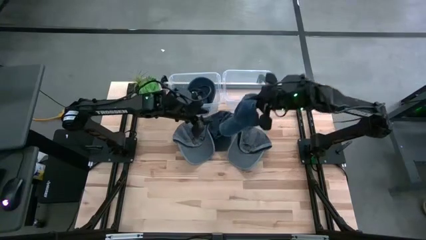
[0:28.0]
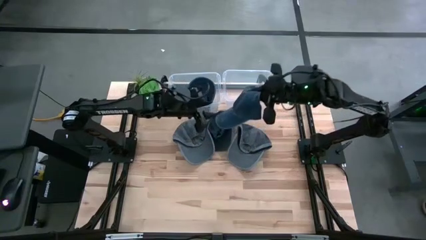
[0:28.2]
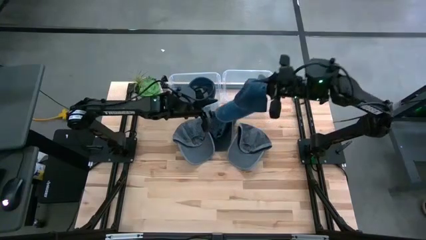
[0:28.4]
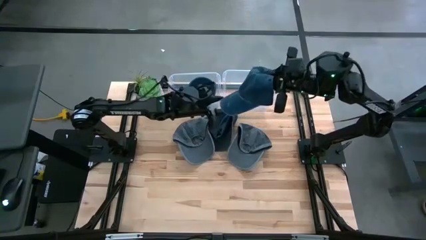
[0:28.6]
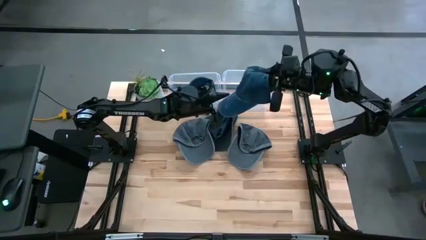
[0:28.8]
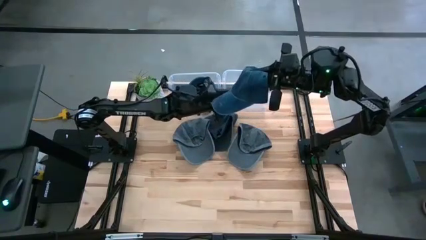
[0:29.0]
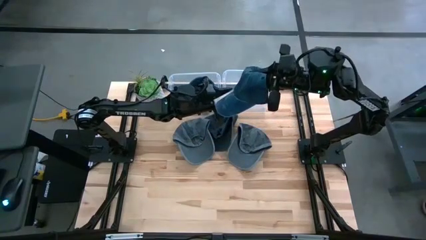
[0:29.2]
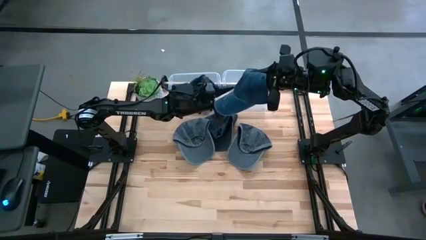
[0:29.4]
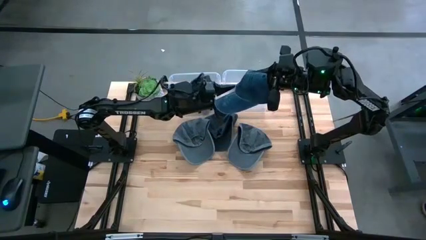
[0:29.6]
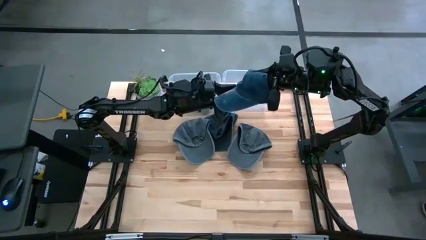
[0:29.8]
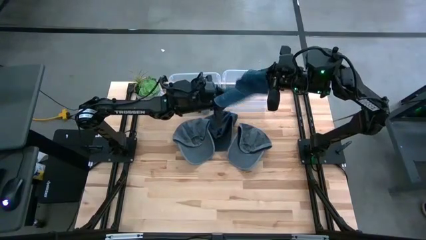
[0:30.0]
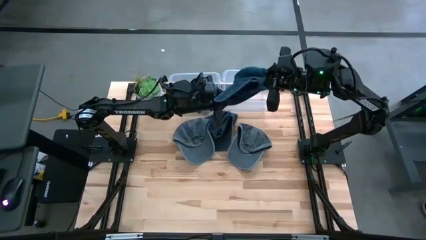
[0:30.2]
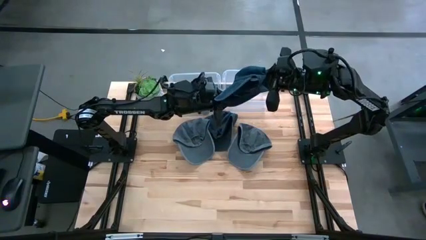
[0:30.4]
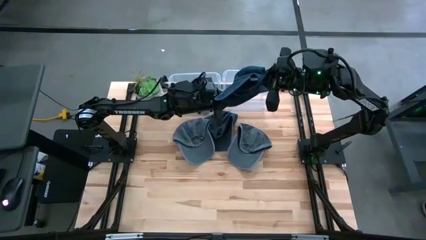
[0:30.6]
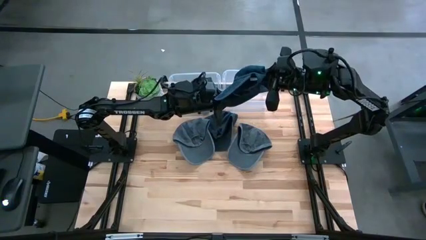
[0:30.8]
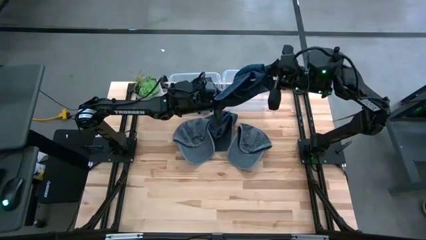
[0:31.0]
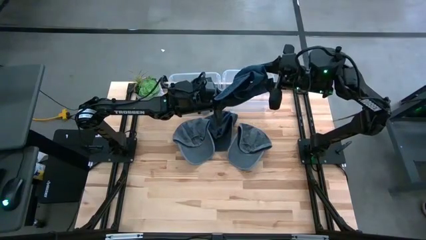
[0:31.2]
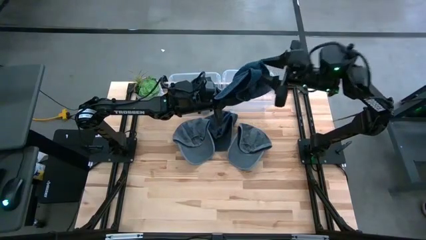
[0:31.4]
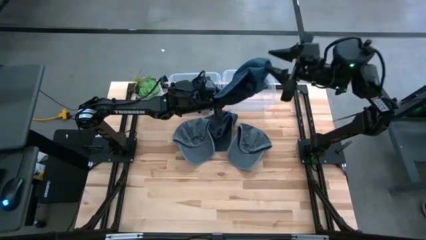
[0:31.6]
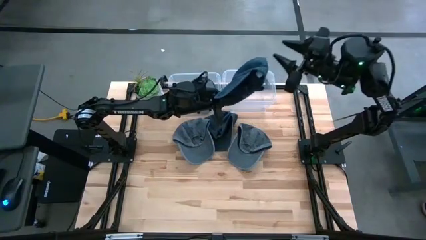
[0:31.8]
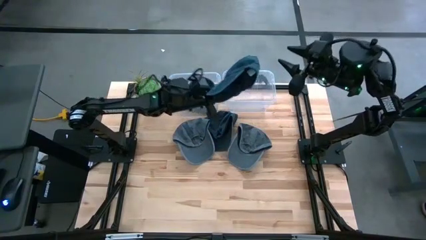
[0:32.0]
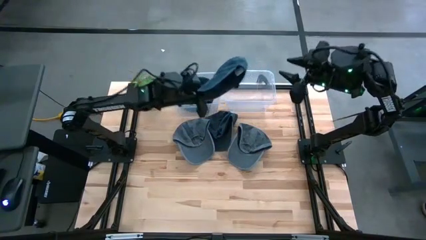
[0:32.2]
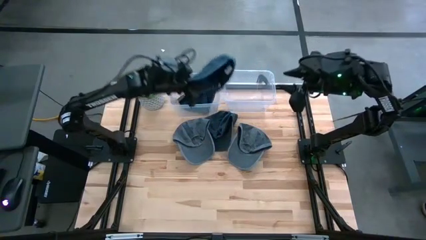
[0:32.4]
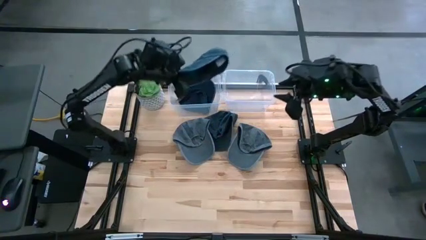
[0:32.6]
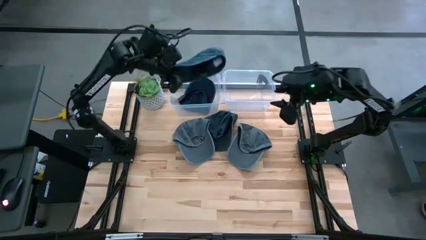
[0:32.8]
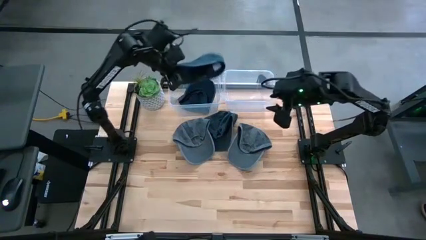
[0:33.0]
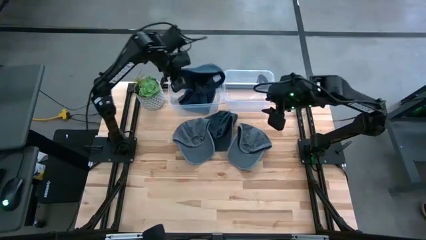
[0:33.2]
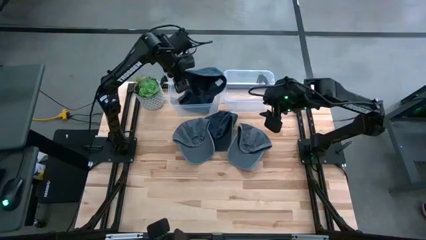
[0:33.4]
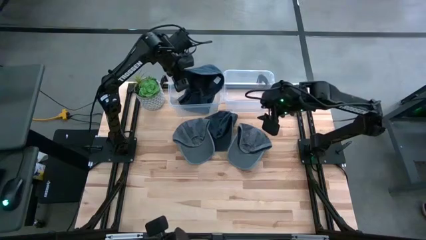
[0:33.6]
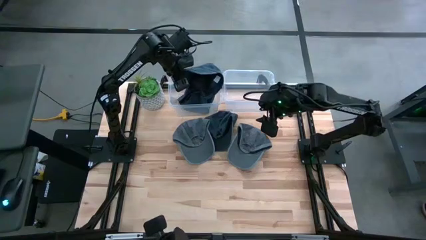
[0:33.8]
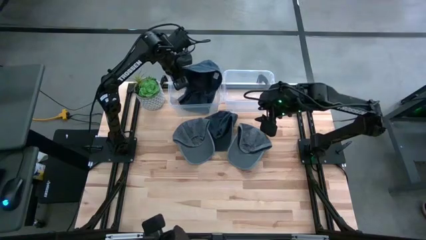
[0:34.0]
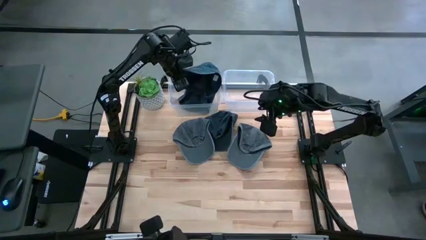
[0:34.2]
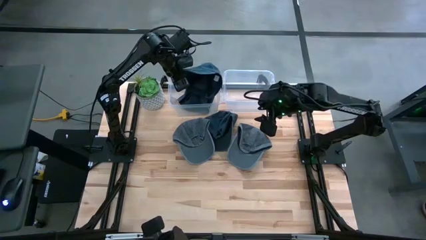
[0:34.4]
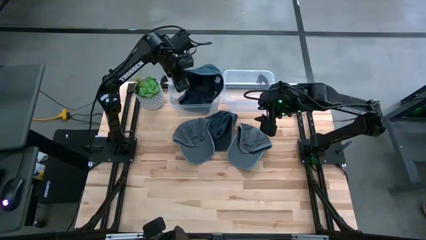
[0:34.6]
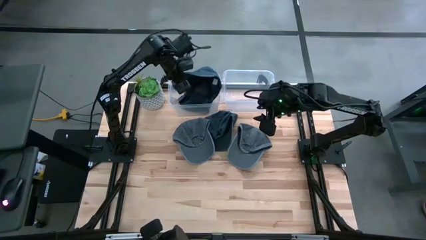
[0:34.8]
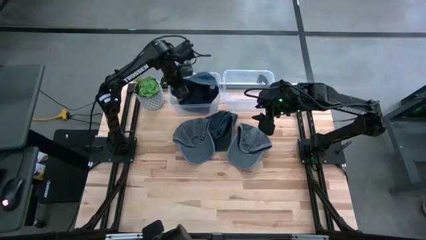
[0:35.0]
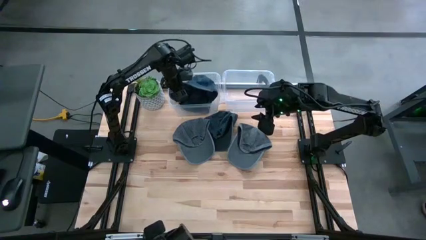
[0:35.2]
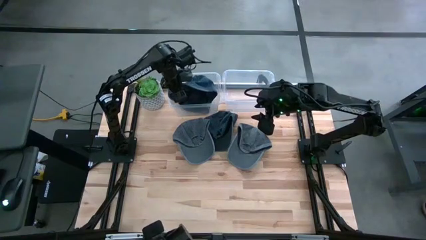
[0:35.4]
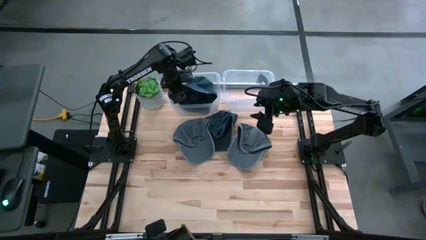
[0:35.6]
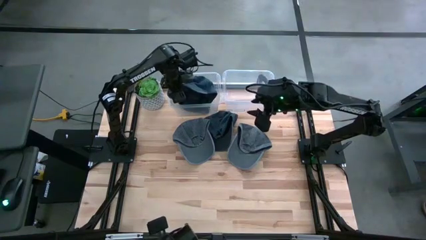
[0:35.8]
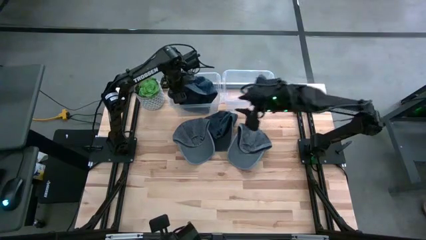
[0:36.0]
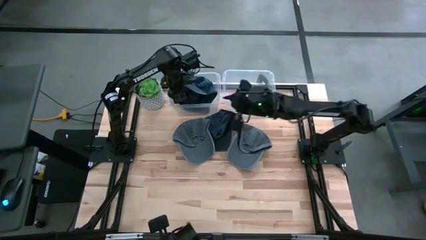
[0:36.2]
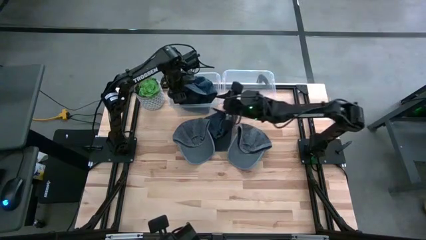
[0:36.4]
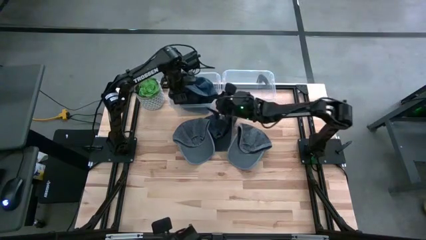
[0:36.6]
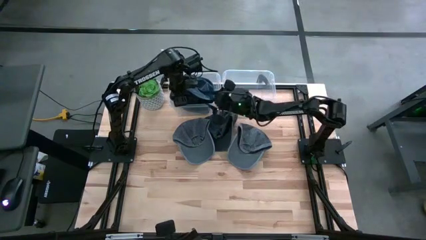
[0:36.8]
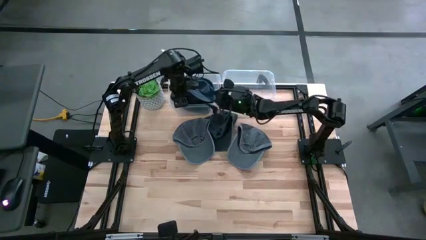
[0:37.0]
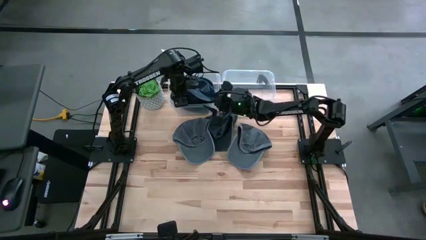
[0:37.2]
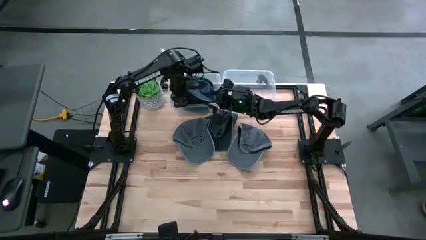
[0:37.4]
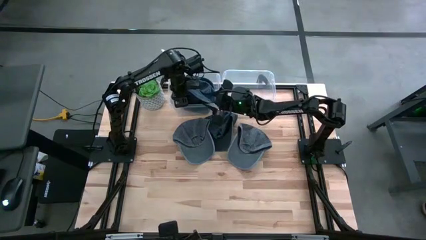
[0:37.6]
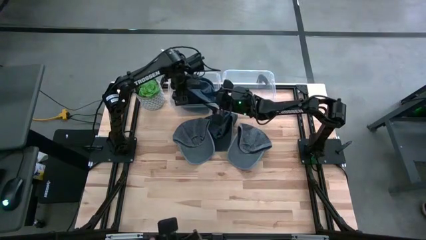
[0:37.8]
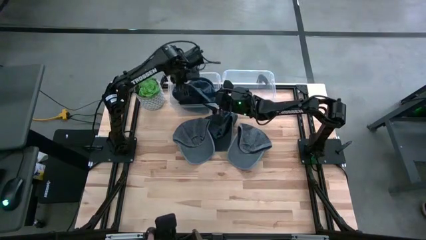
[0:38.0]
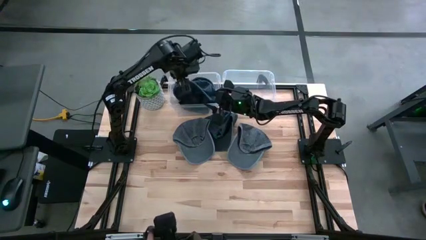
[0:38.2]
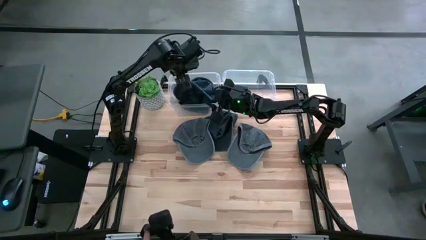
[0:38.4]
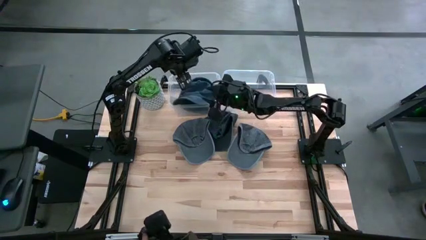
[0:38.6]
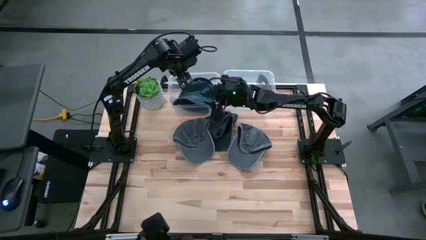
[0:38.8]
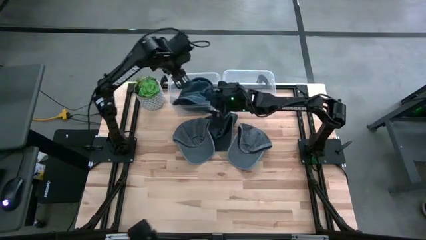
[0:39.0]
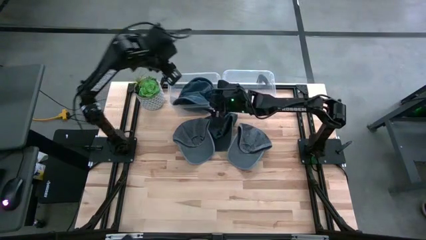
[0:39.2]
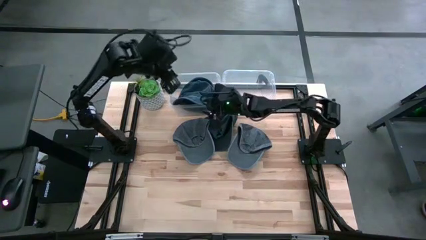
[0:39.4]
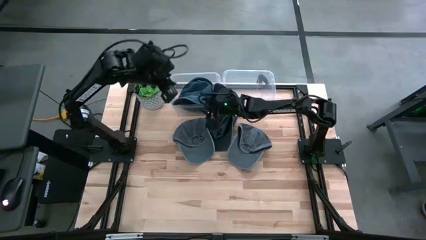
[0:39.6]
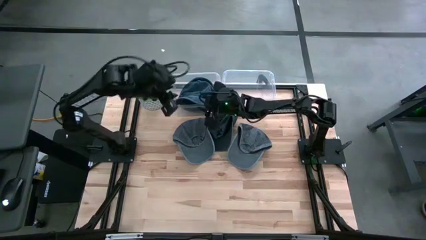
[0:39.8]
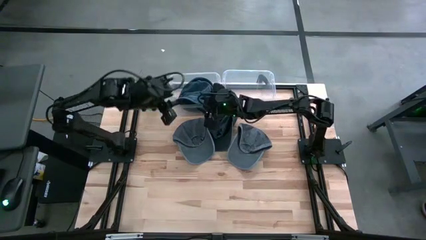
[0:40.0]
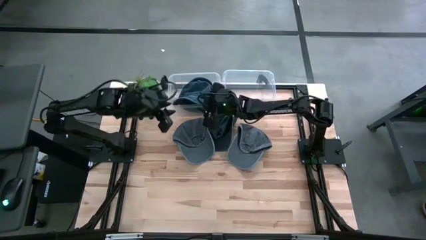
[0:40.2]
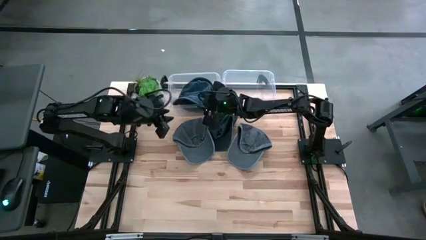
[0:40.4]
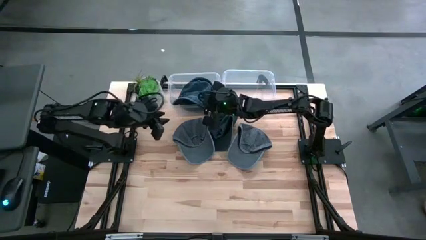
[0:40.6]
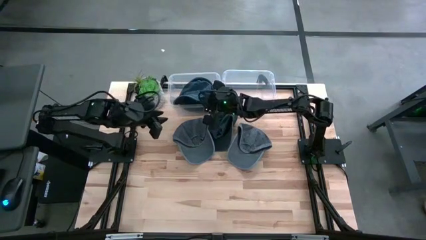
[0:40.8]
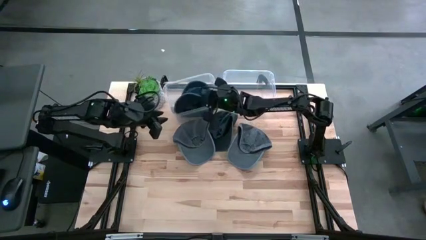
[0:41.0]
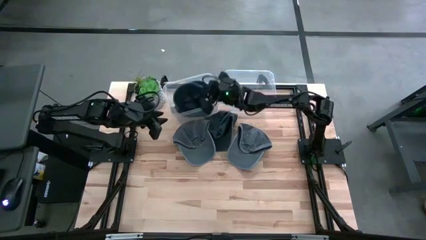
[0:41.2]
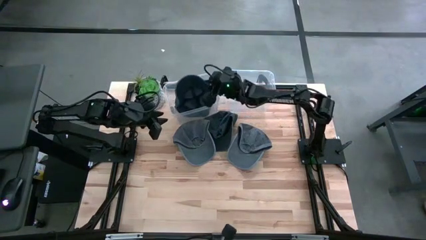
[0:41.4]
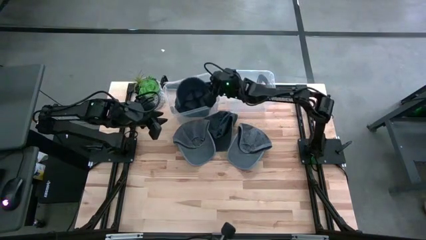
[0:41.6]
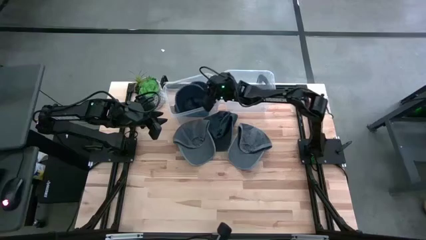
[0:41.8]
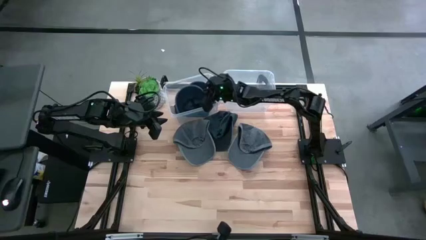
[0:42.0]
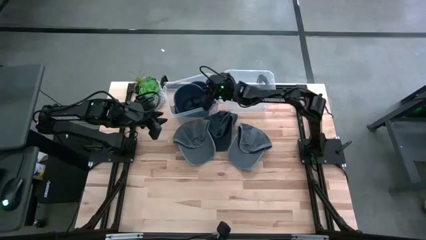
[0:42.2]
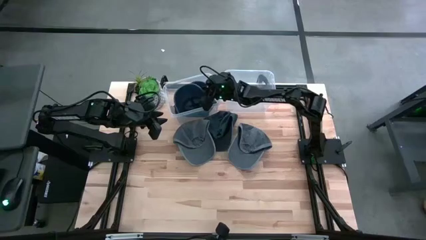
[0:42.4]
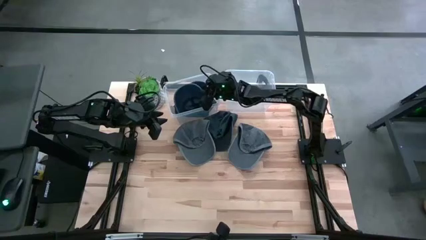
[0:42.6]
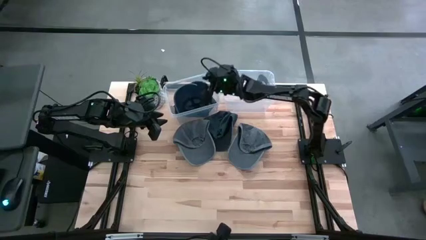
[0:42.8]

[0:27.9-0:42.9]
Task: Pick & Place hat
Put the bottom dark blue cap into the left transparent bin
